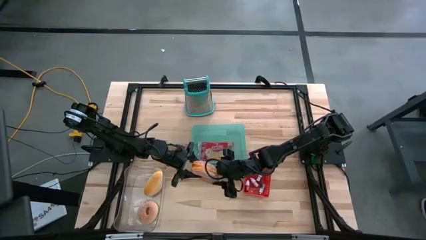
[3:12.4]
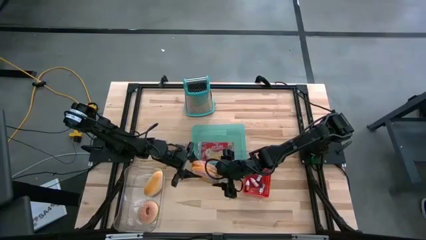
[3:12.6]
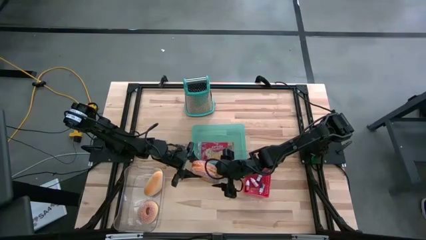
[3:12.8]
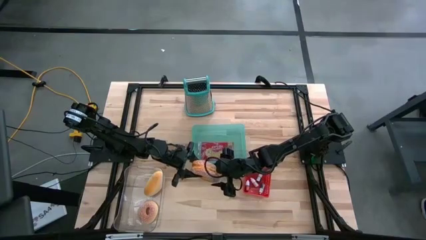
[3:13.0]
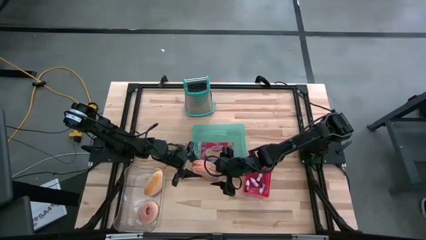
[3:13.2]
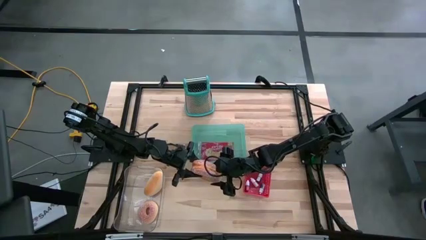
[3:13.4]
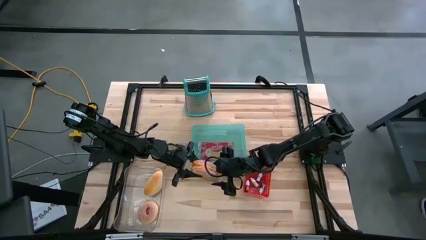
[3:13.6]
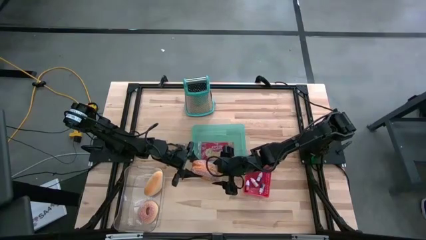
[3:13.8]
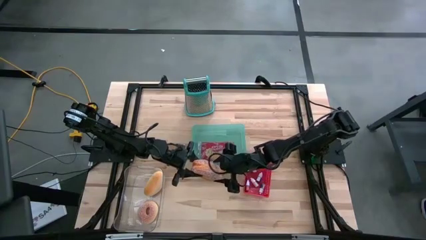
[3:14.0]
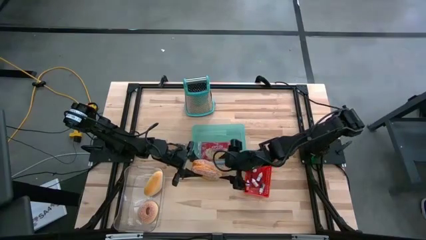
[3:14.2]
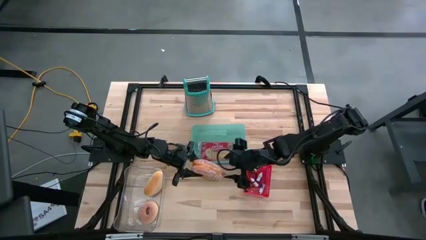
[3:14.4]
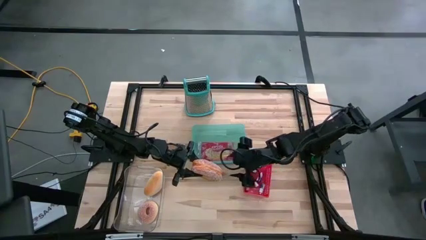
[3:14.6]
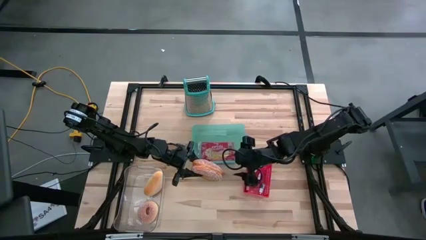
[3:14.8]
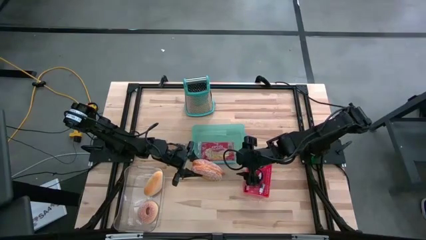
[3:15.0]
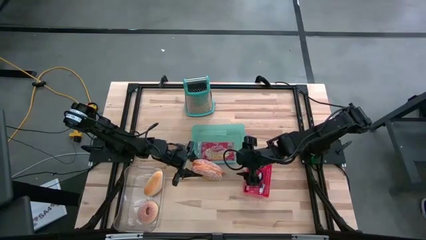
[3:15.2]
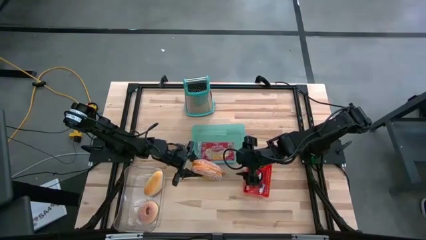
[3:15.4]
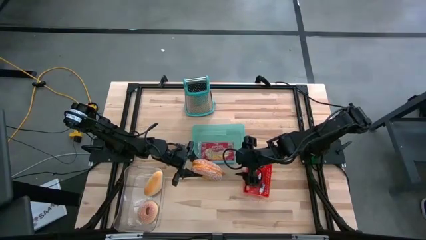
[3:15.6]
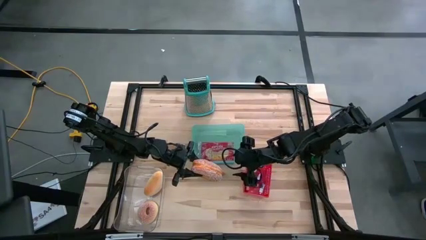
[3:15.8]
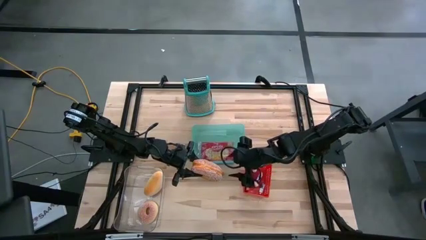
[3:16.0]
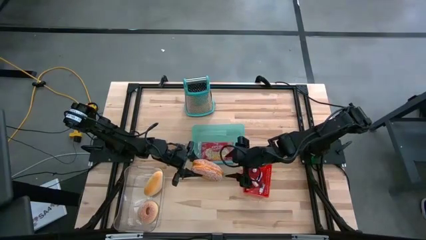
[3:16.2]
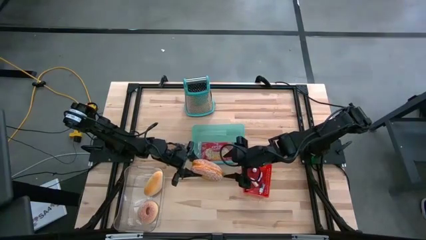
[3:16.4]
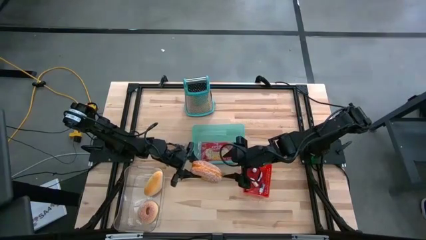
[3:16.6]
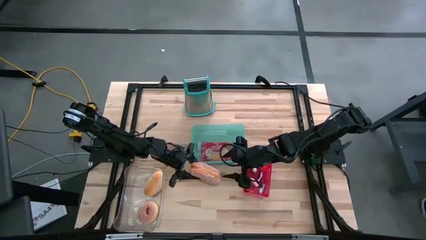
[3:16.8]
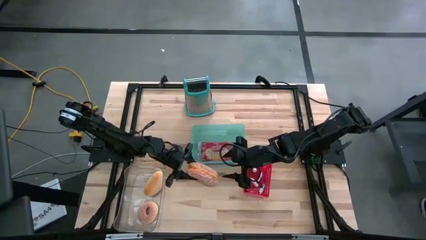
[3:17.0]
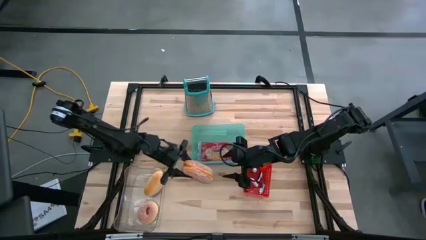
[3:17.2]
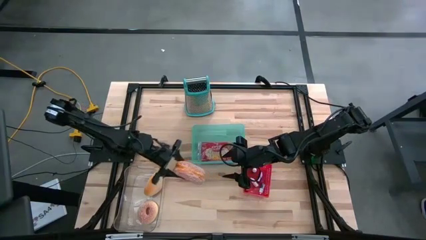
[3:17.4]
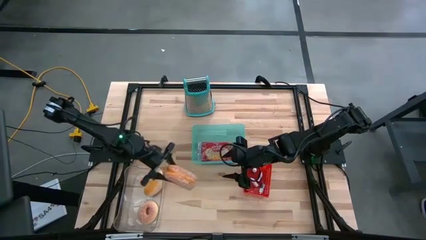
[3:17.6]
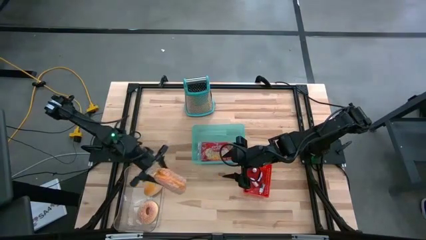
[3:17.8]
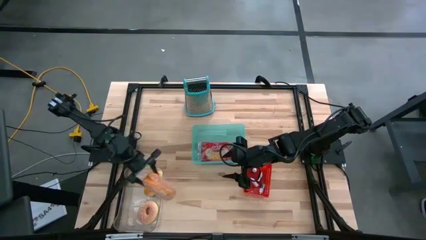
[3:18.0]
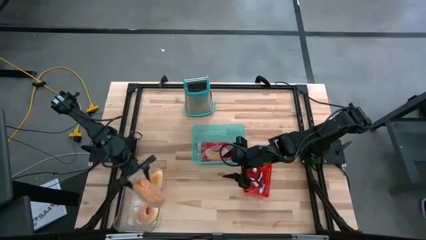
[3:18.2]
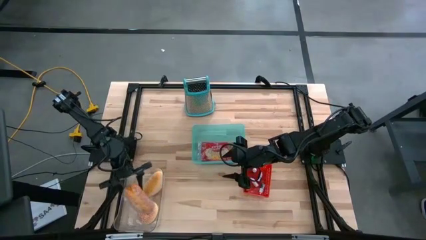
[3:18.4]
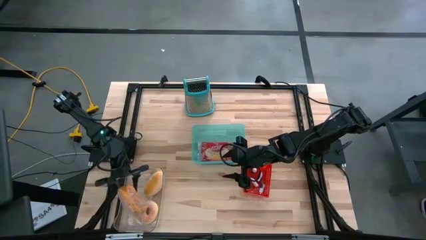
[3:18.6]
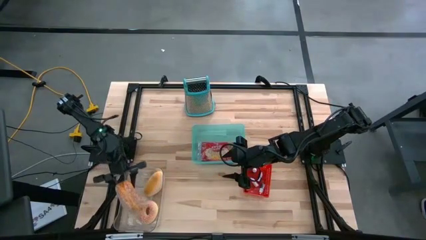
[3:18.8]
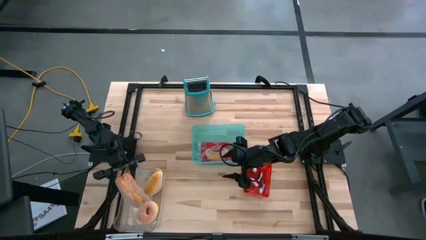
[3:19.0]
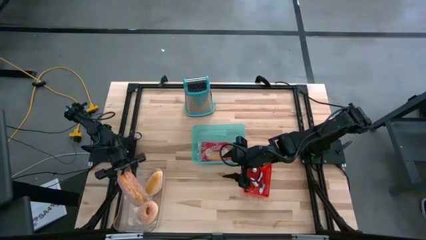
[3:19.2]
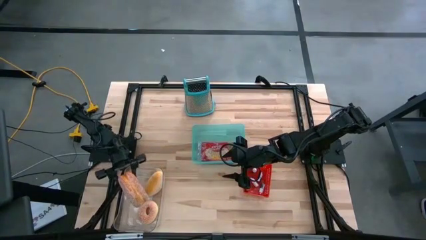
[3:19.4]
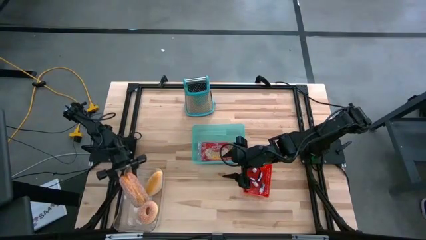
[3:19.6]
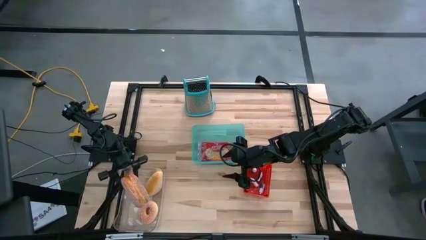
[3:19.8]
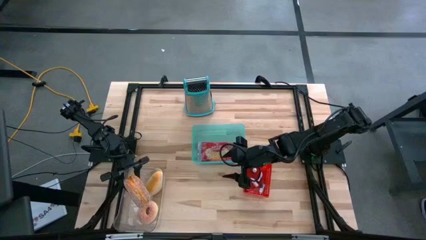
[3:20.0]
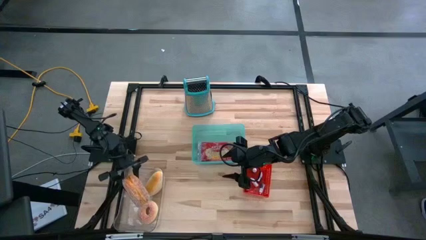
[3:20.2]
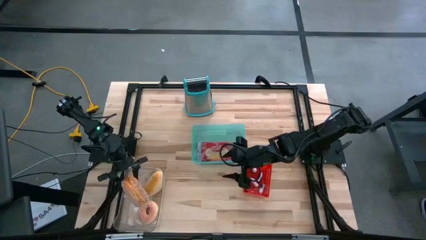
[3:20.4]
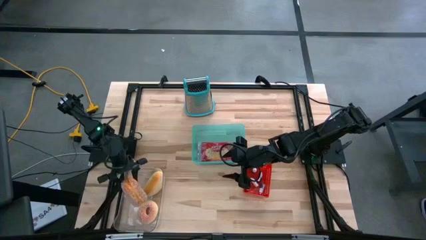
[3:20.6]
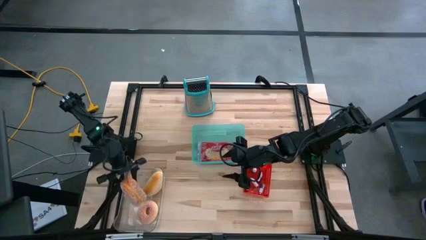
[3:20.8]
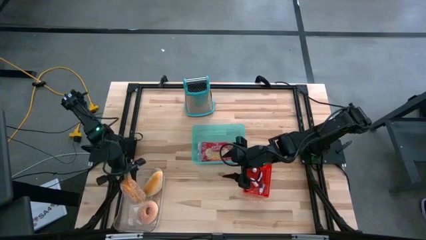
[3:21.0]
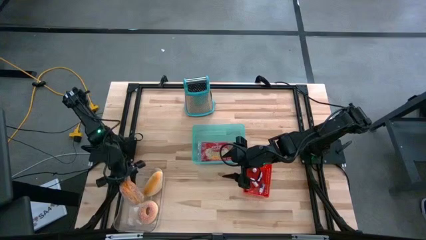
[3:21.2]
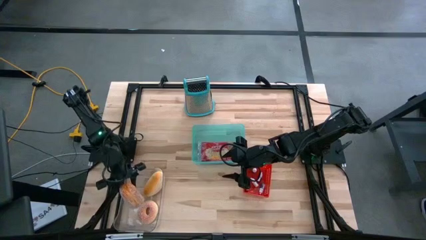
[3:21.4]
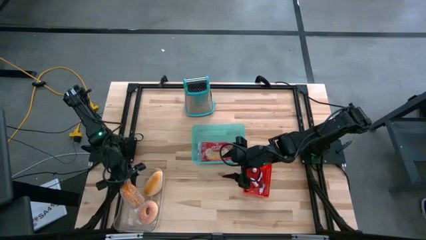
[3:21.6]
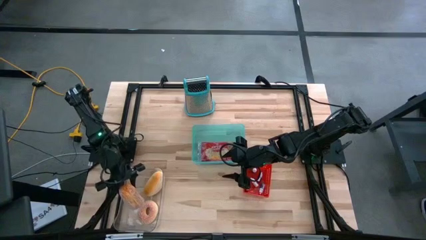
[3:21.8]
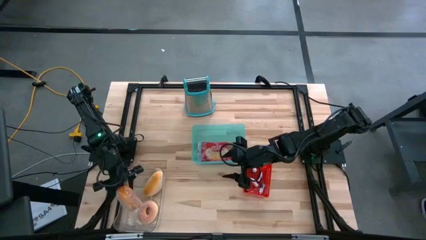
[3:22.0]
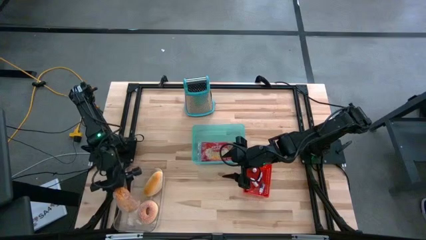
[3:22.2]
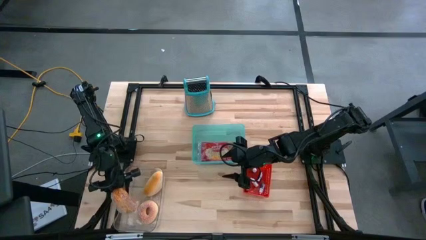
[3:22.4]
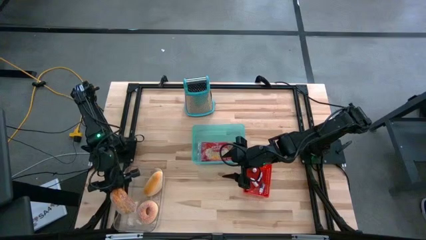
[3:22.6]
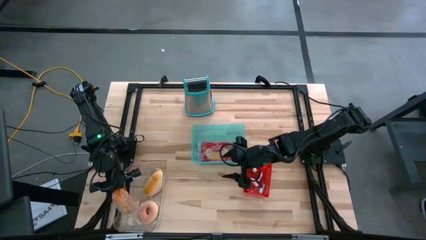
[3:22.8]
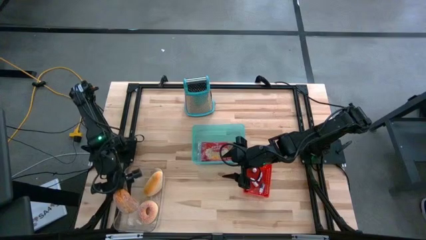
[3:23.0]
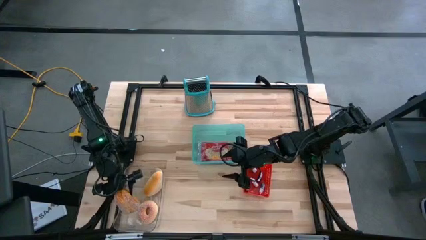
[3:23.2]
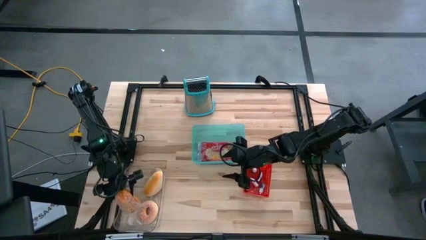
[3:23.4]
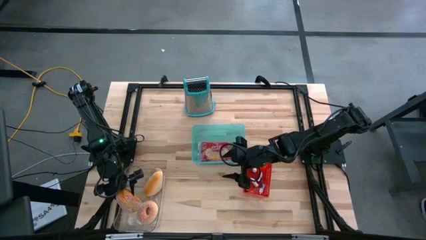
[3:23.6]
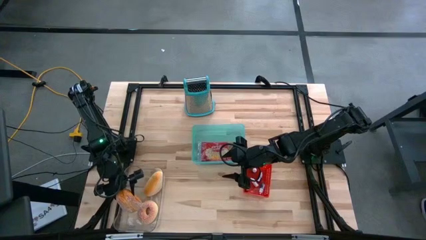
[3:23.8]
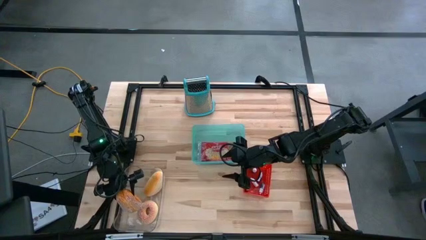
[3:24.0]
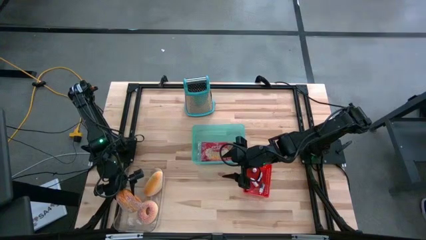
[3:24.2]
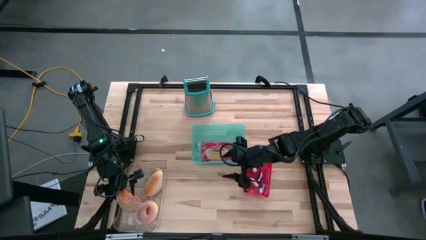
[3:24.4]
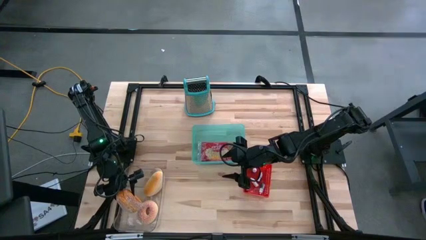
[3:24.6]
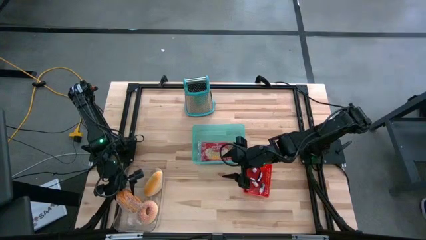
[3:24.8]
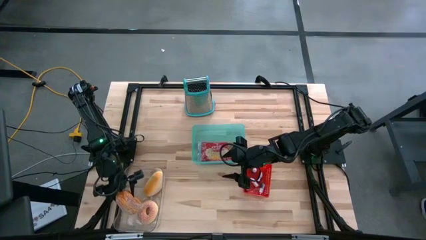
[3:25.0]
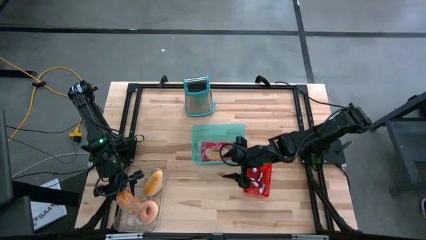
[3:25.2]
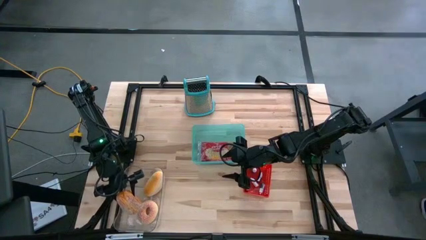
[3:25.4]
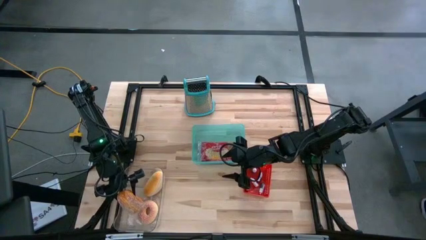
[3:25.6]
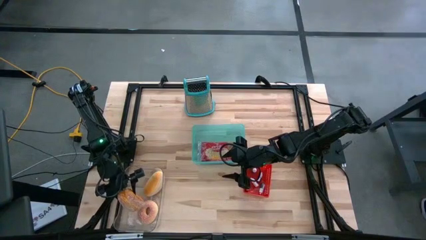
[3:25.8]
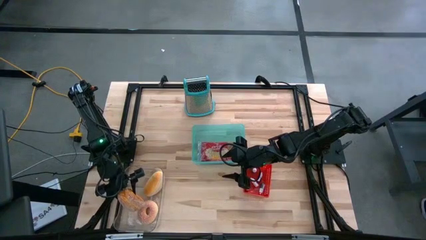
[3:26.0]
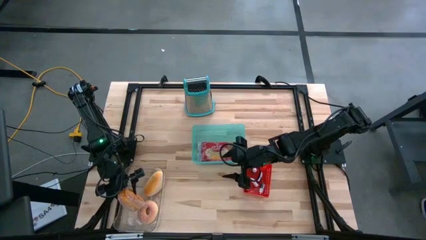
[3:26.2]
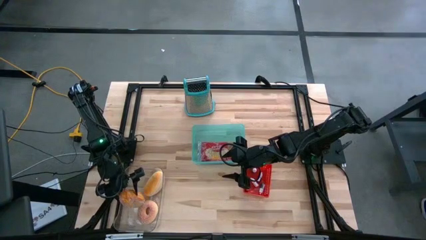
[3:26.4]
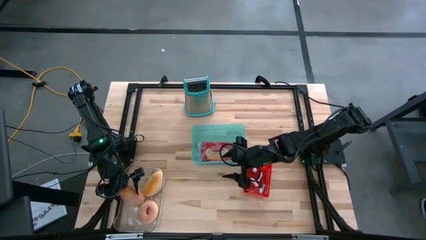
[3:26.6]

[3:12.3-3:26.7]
Task: Pick & Place Food Item
Put the bread into the transparent bin
